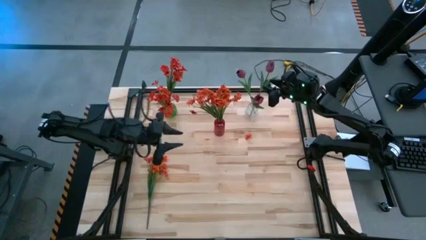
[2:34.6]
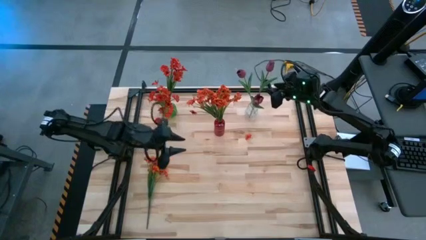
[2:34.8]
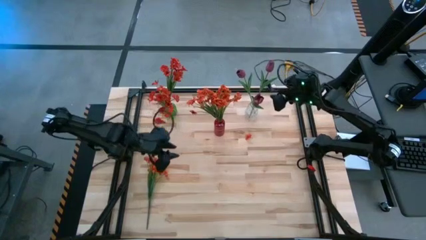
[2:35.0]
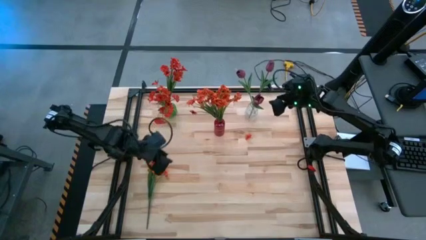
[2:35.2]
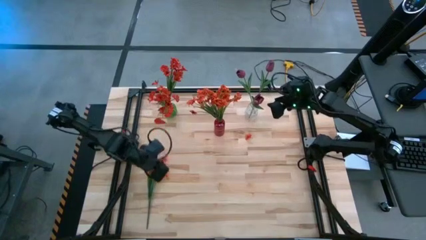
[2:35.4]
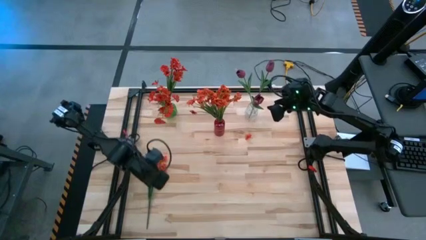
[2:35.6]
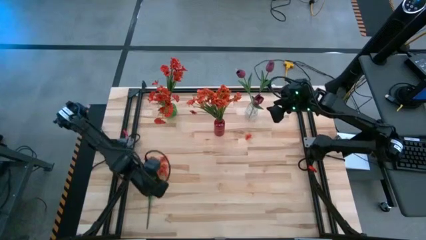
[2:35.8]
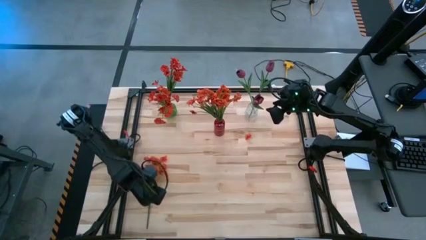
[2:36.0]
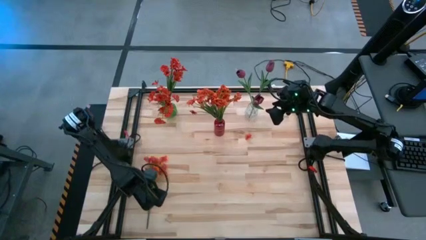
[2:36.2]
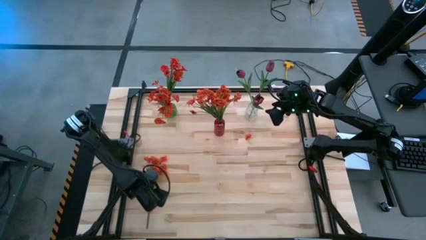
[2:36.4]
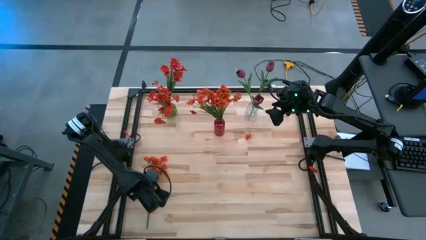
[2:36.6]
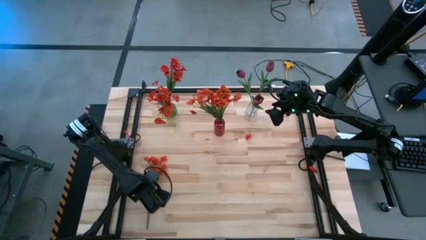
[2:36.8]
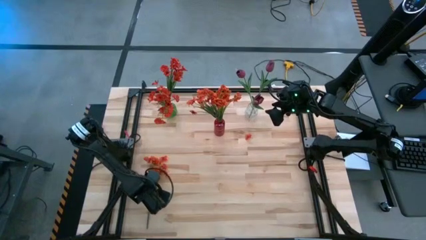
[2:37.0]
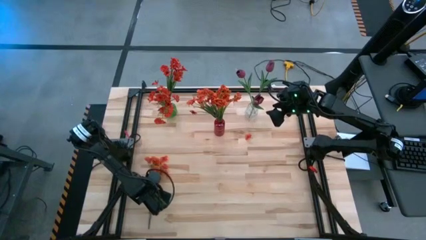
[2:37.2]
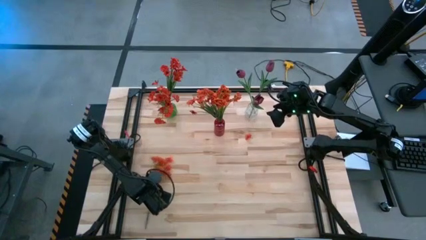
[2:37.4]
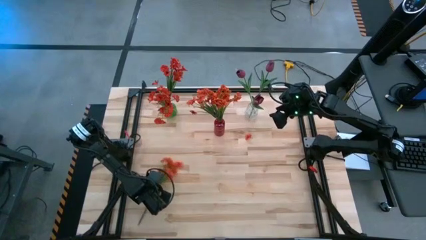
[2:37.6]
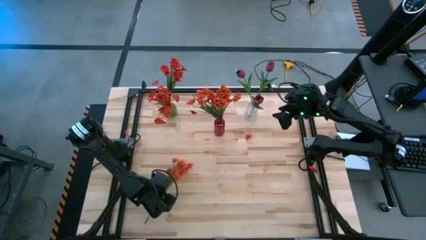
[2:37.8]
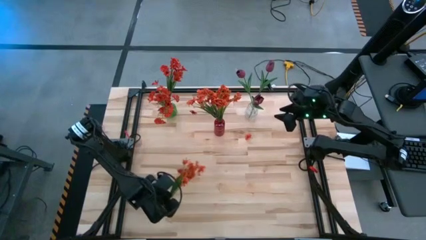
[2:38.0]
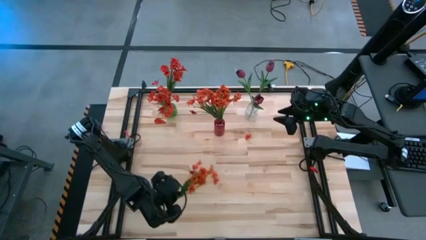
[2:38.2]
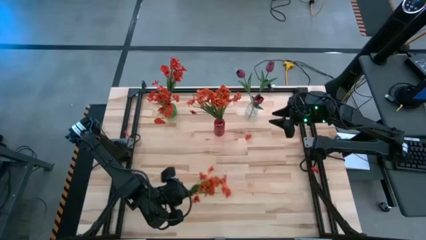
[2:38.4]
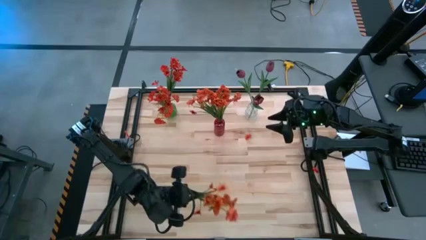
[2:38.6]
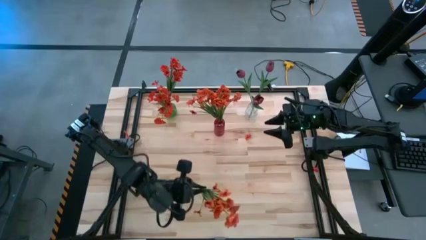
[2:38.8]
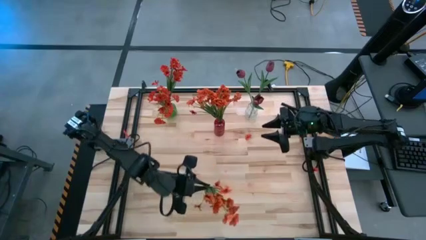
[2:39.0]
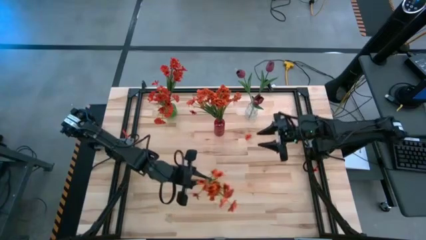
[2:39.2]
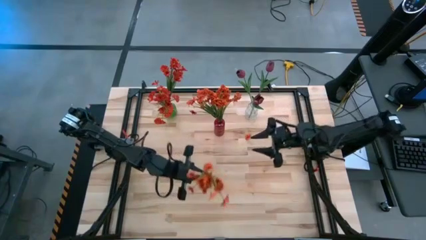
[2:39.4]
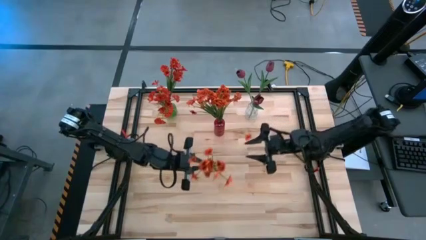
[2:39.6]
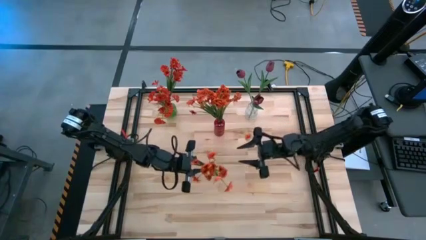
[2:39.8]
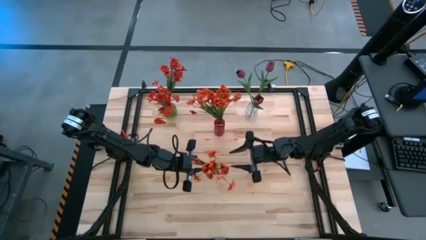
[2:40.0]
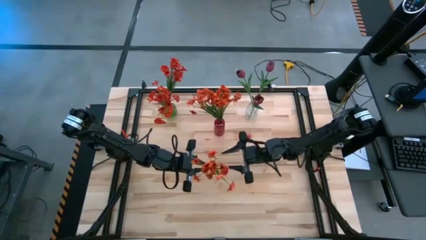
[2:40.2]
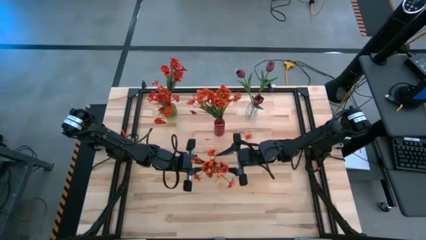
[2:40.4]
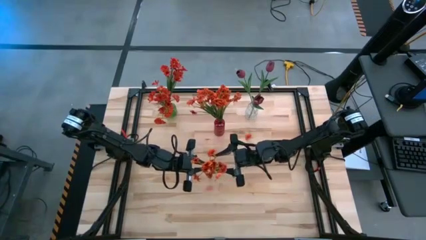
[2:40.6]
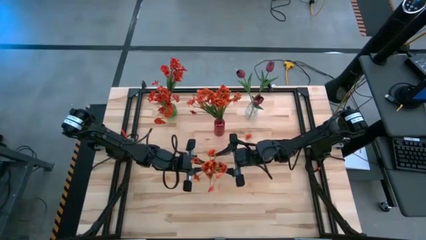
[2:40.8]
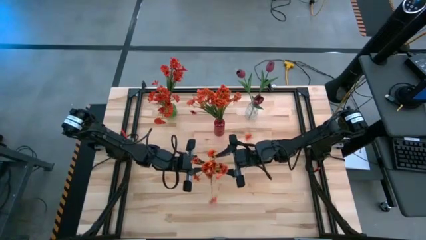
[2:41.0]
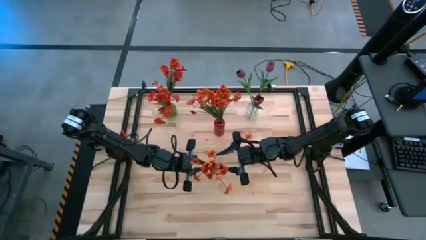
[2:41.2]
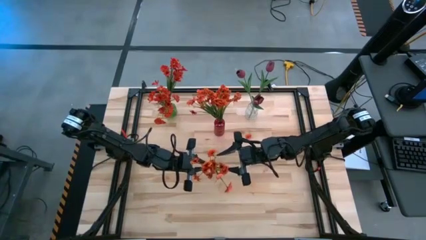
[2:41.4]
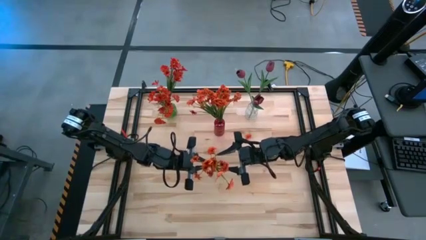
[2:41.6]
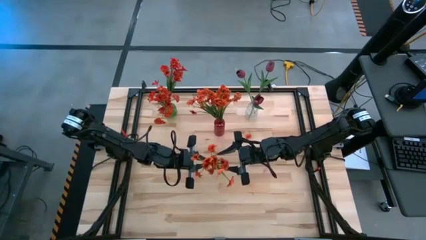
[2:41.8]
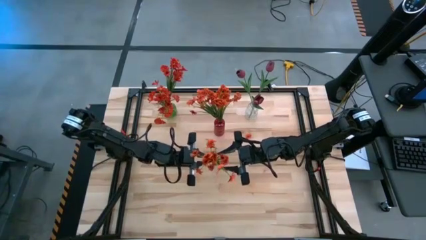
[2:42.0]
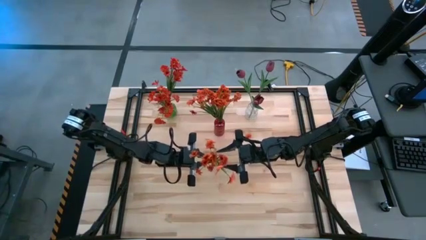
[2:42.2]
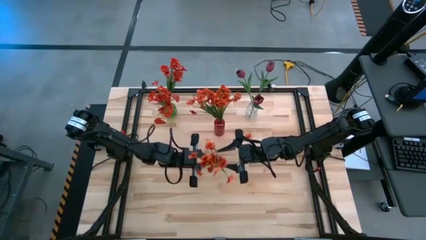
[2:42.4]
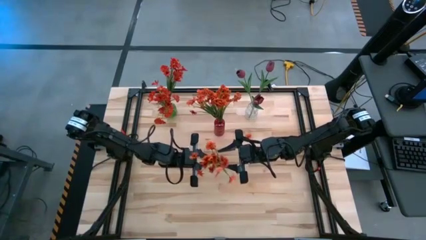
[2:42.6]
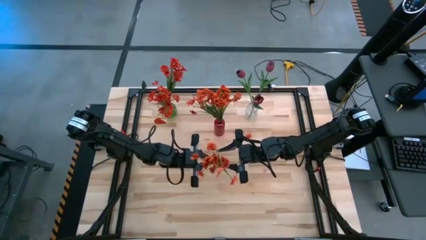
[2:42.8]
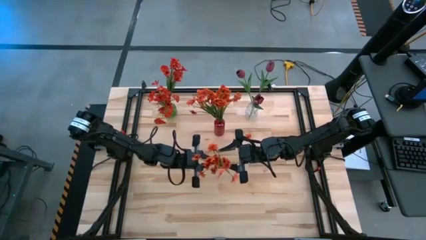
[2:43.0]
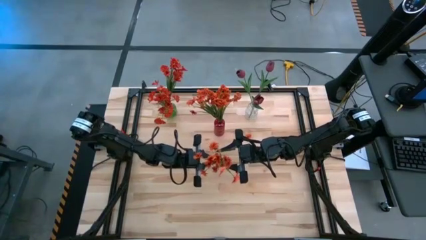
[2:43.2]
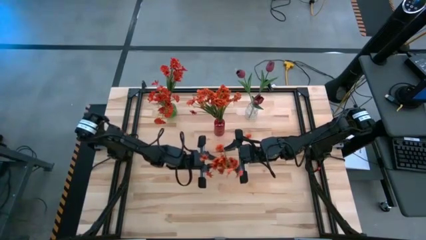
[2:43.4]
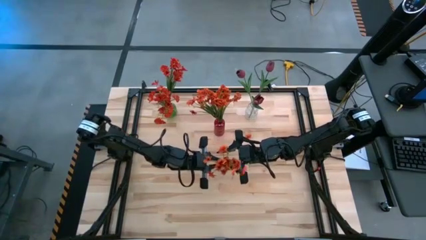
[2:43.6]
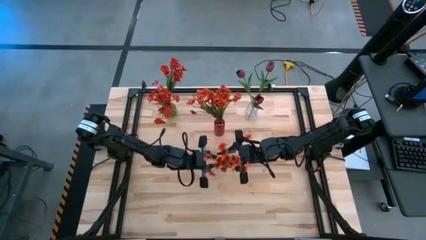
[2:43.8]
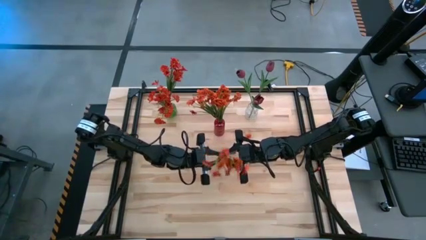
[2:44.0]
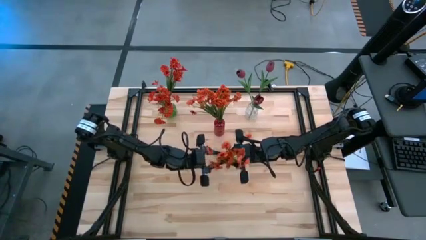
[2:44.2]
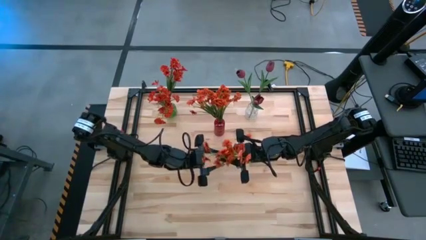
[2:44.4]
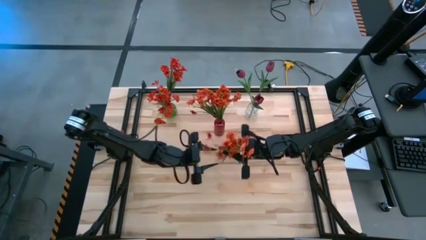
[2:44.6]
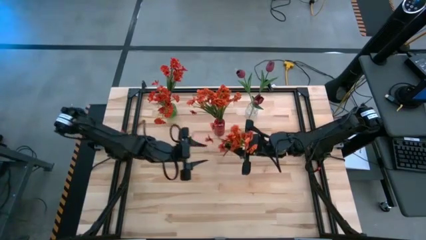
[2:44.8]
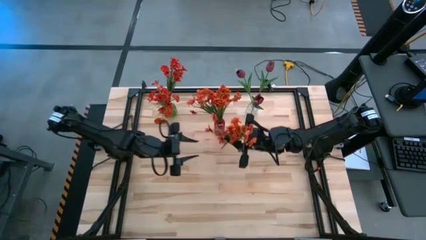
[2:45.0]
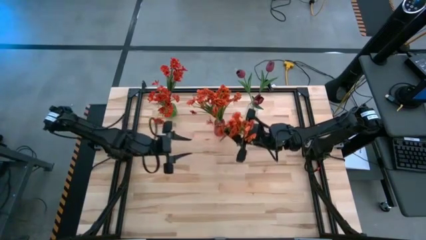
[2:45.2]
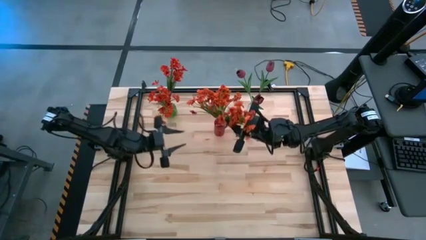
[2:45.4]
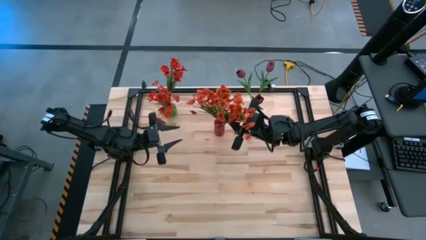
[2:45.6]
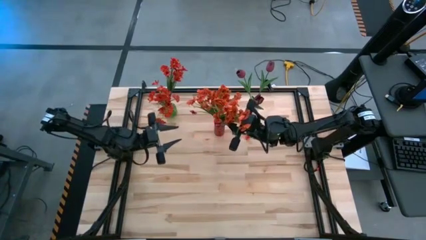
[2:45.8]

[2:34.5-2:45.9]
Task: Sort flowers into vase by color
Put the orange flowers into the red vase

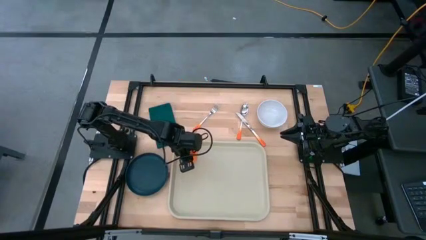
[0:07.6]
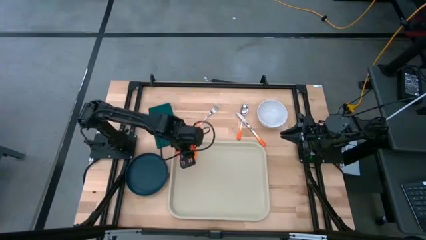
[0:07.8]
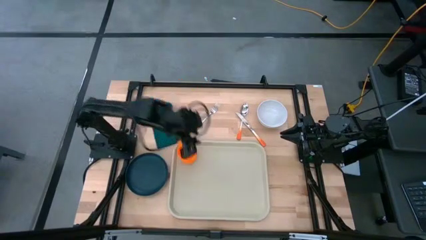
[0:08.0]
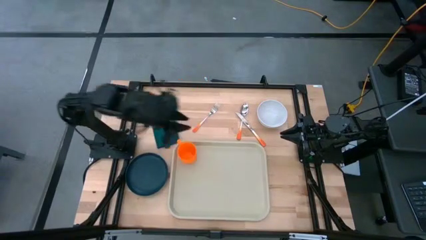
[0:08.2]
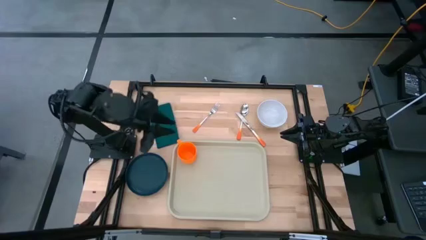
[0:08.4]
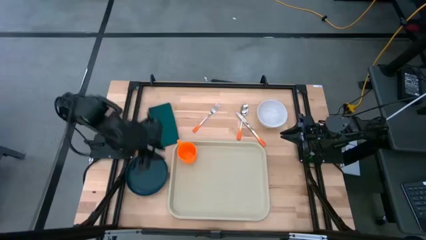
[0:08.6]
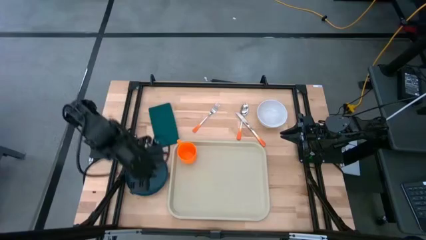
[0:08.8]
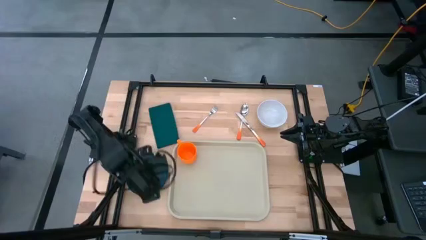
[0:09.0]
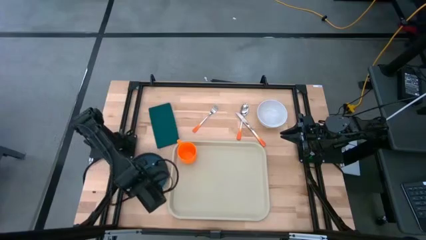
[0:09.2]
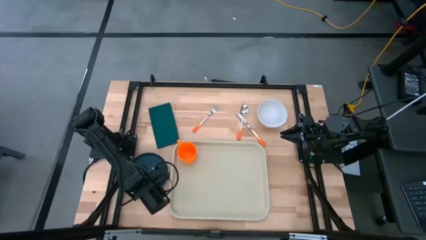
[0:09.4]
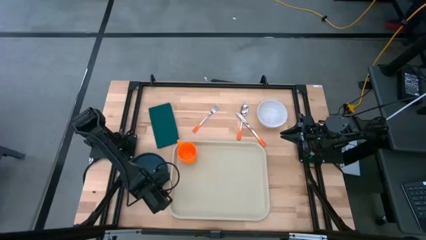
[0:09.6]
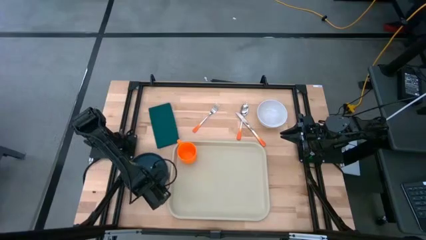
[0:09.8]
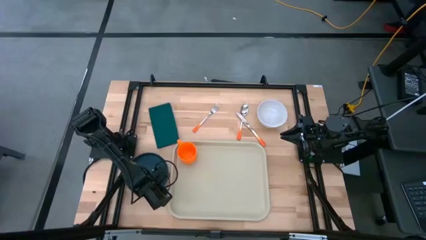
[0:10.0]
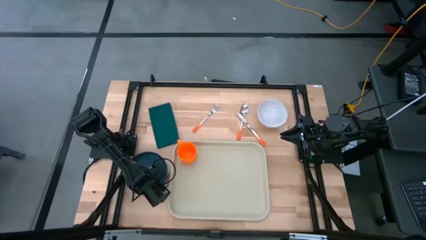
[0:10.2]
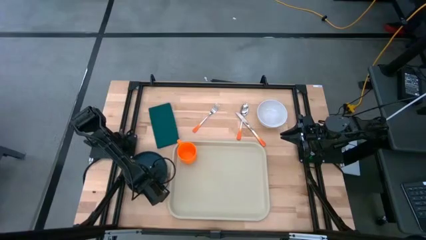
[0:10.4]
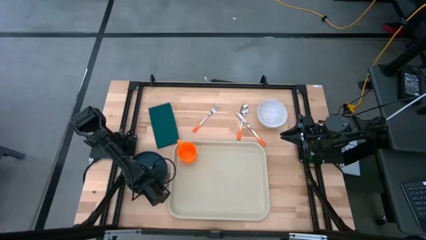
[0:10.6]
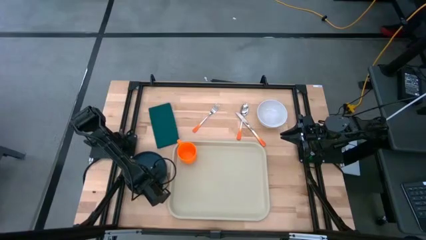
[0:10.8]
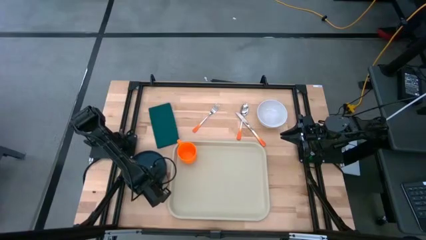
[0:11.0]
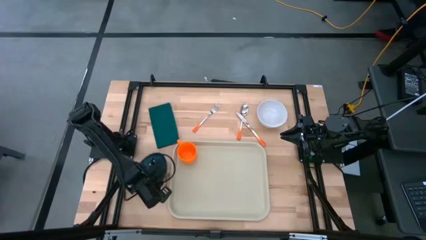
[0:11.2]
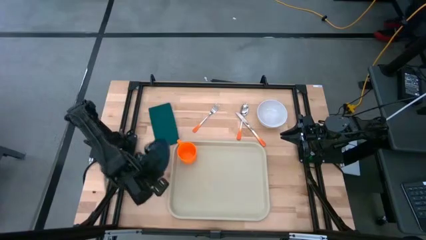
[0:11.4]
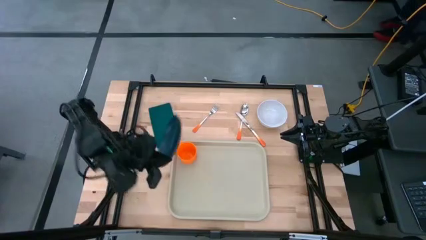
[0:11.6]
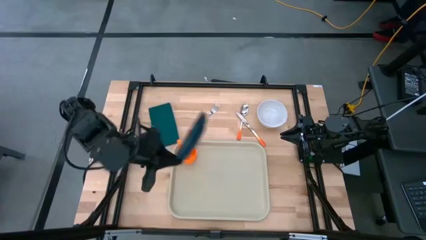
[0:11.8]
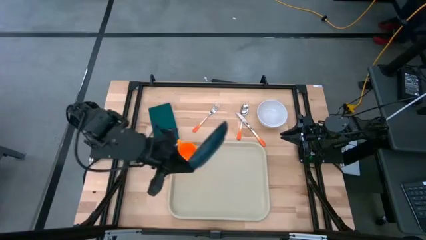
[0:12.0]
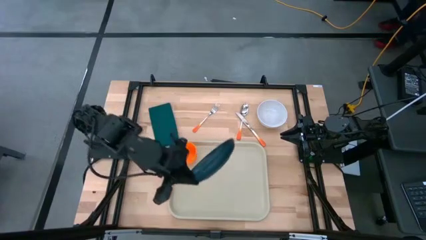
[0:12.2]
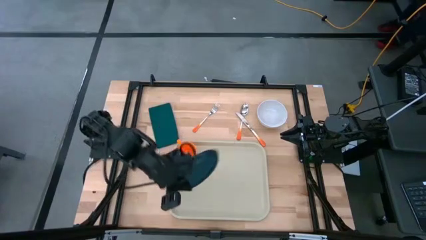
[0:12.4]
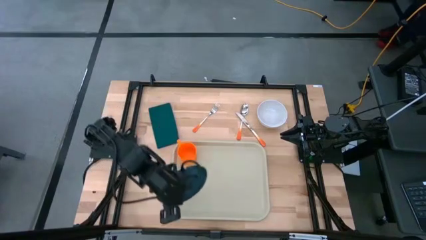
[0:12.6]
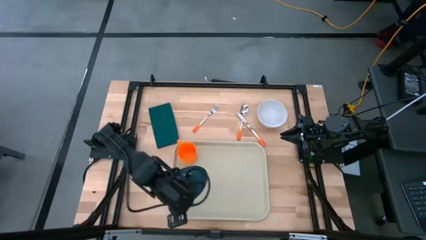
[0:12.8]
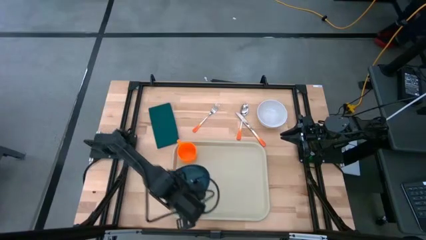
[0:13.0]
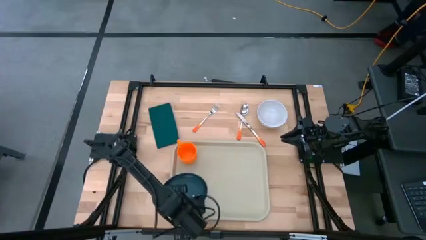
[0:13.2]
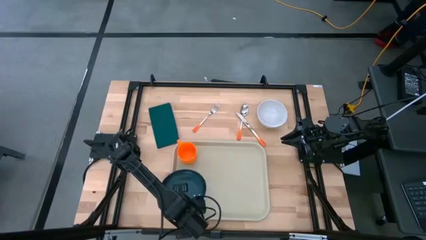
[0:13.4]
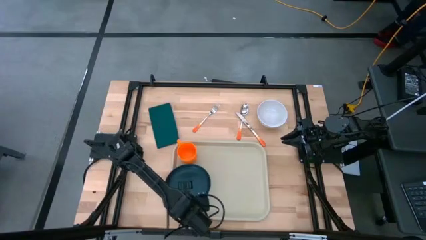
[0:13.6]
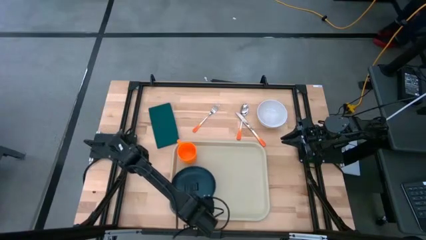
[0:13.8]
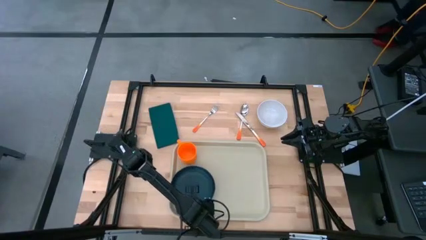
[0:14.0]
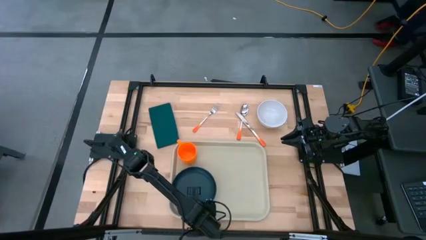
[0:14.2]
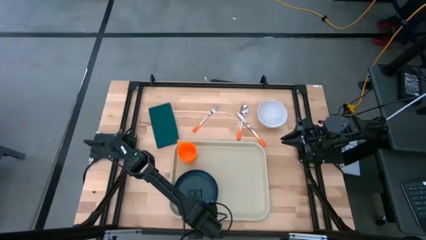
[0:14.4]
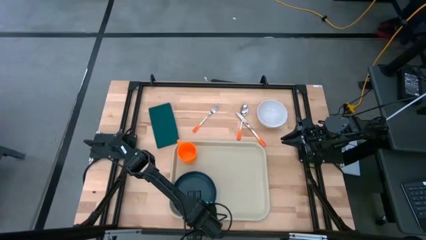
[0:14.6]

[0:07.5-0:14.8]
Task: Set up tray
Put the plate on the tray to the bottom right of the mug
